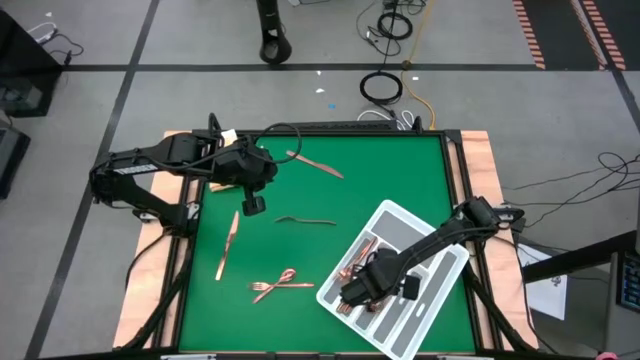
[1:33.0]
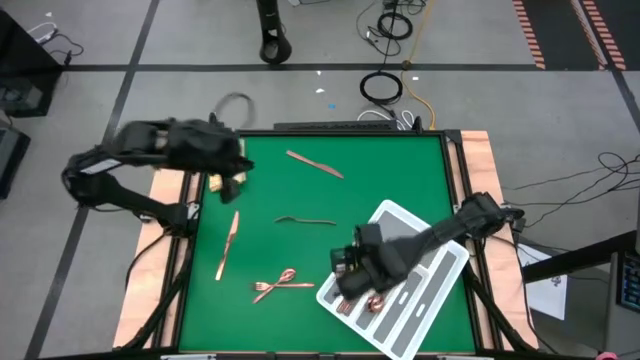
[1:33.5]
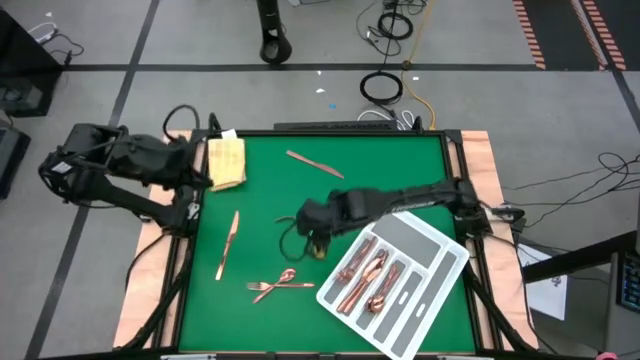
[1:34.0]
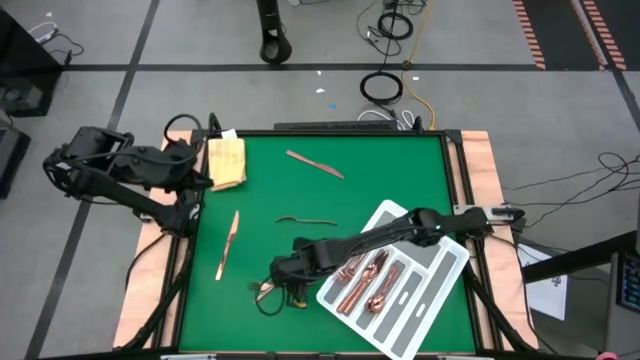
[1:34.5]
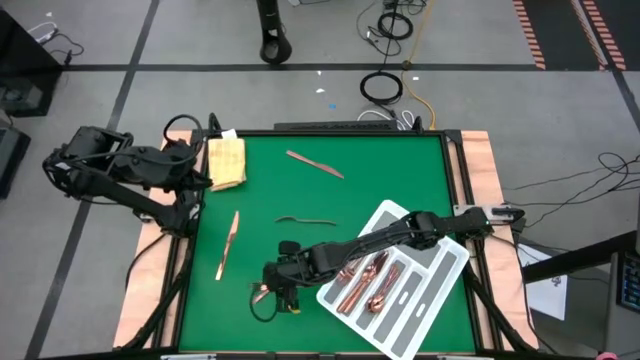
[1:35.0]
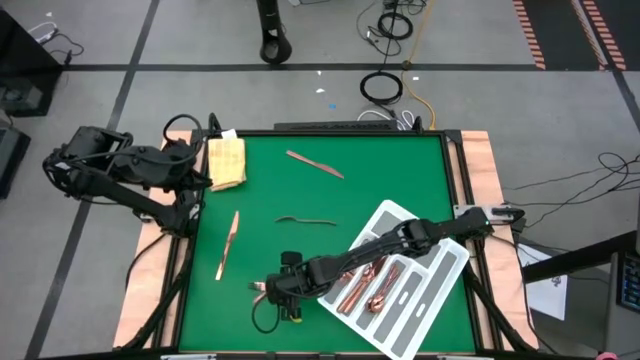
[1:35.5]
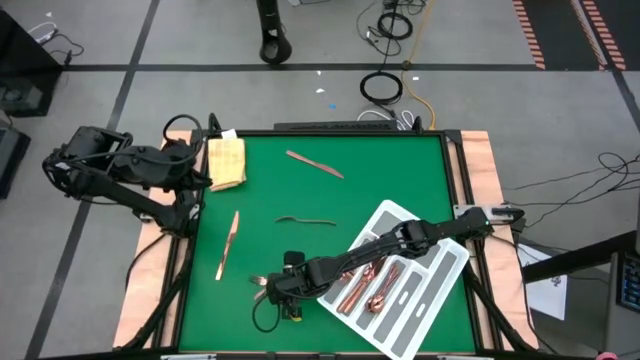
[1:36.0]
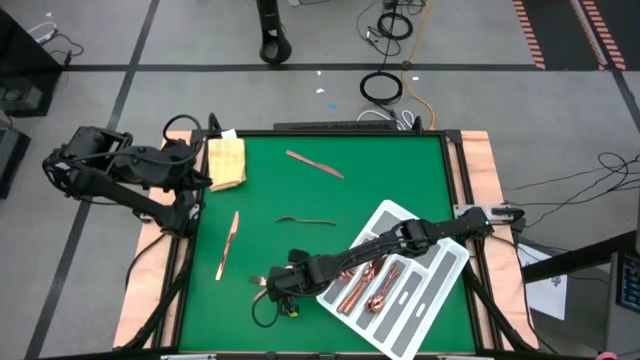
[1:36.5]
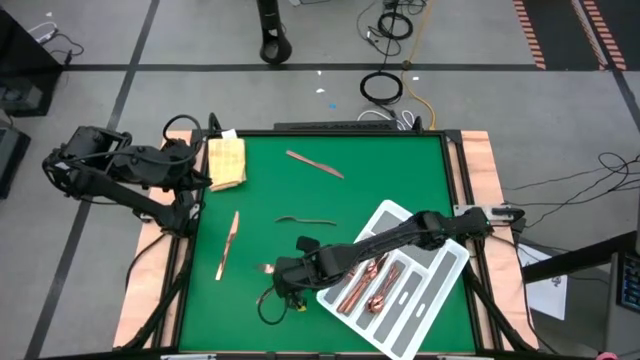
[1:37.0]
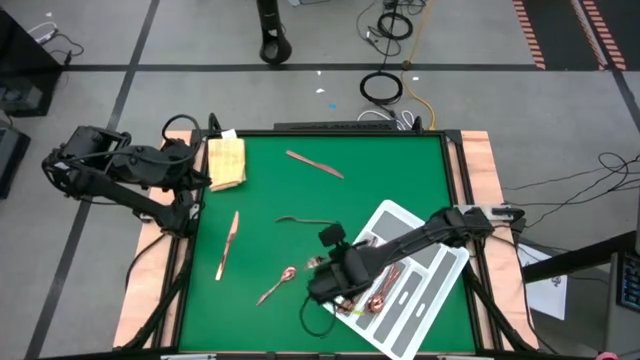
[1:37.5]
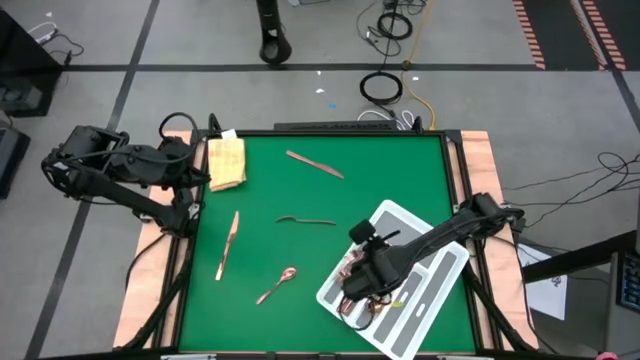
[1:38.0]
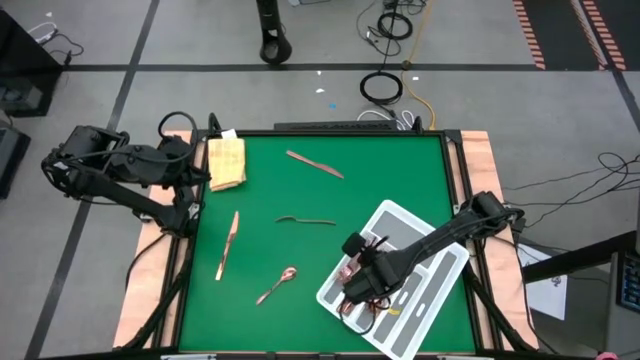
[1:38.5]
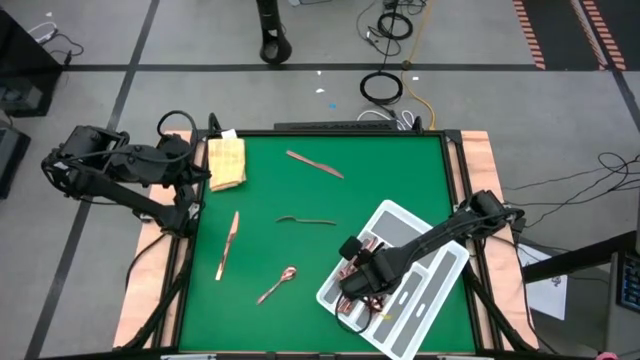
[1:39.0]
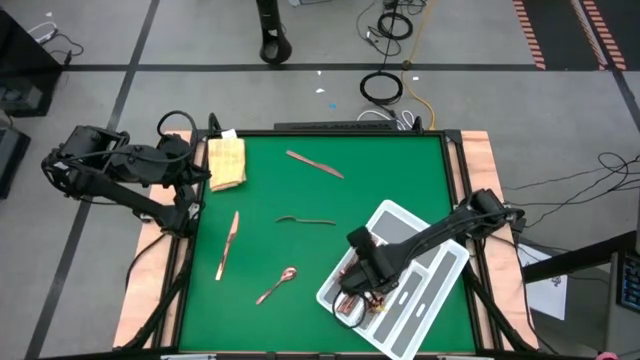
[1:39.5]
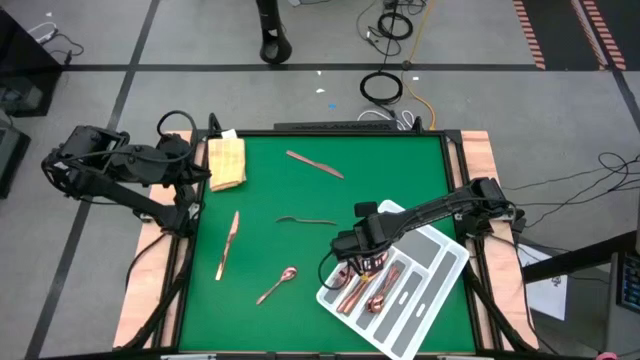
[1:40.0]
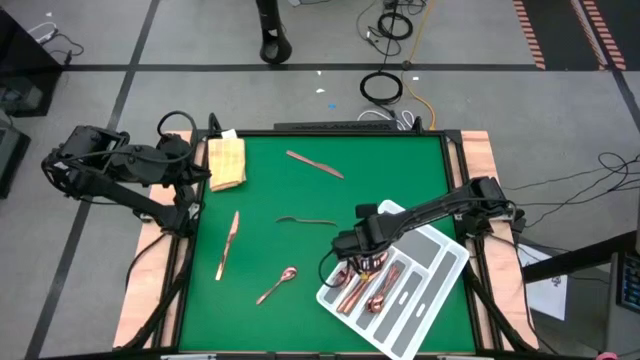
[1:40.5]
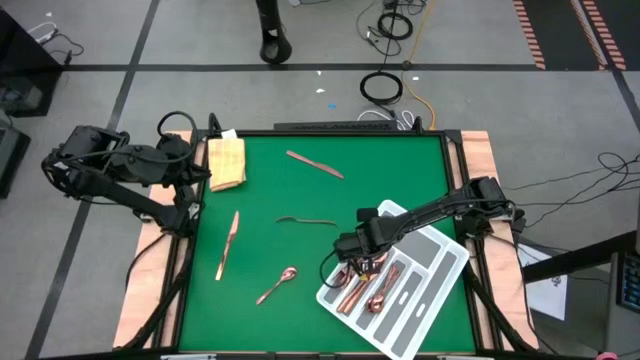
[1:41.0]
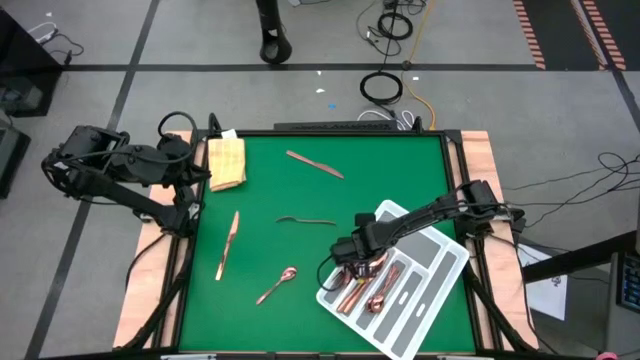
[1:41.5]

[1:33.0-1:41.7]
Task: Sort silverware
Put the bronze fork into the silverware tray

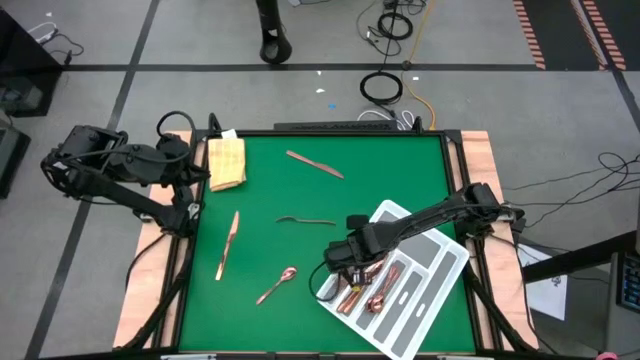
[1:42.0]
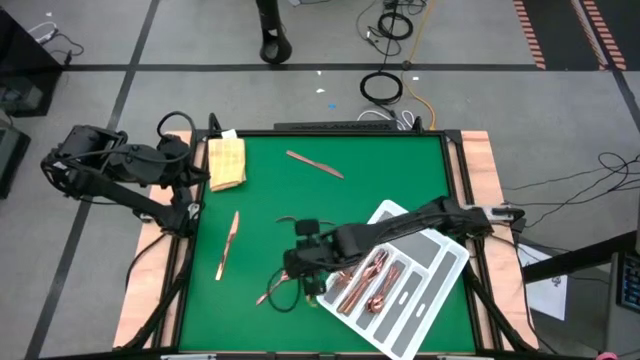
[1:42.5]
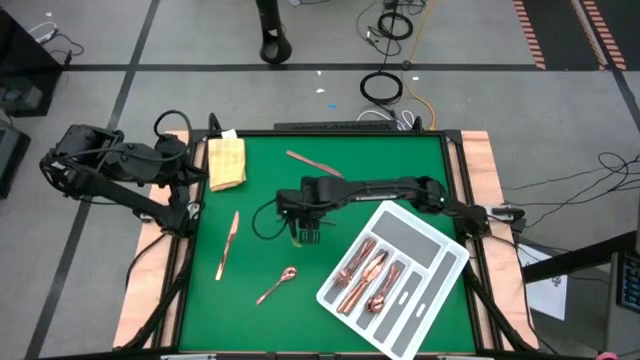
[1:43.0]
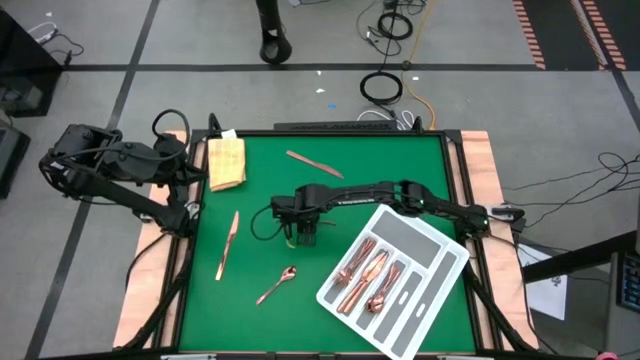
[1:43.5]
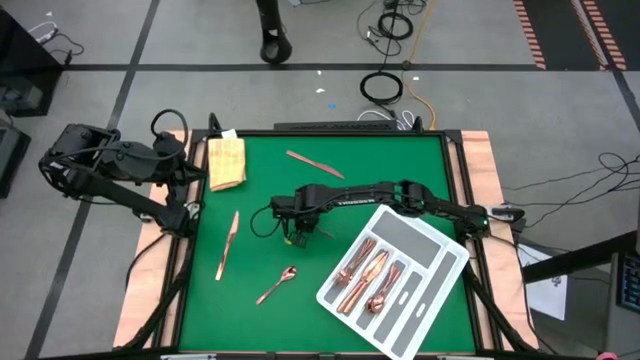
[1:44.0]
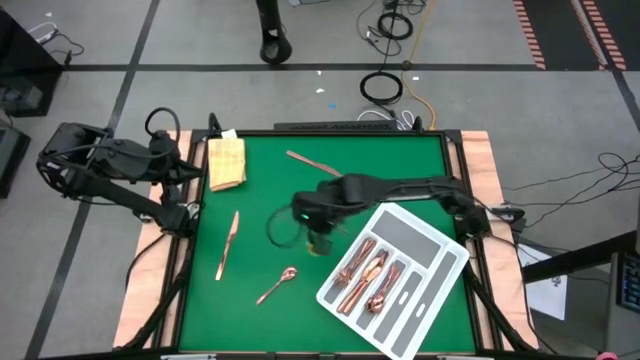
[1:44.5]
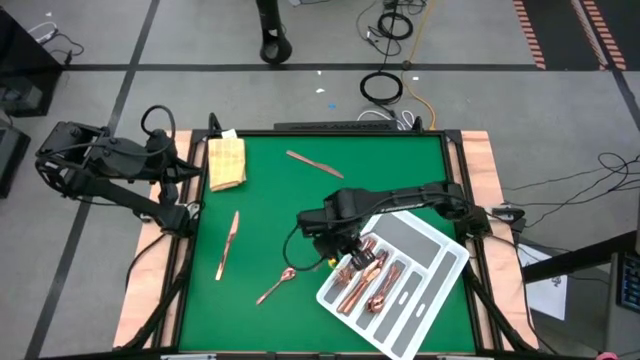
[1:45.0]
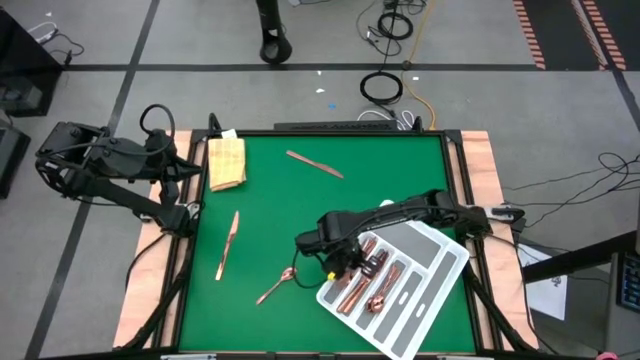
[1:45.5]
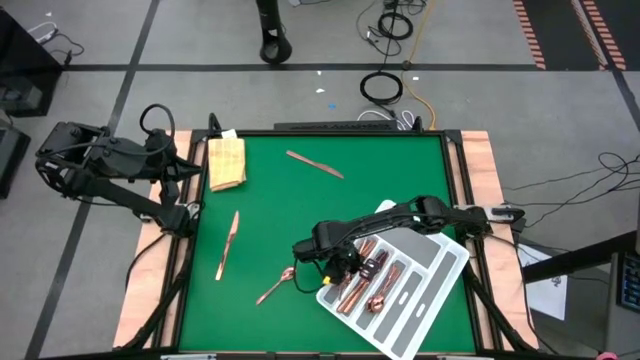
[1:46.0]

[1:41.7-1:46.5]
Put the bronze fork into the silverware tray

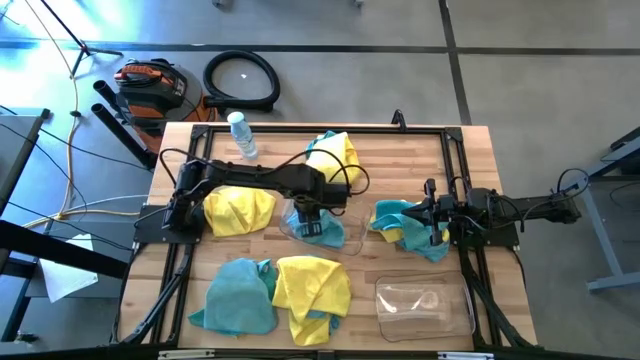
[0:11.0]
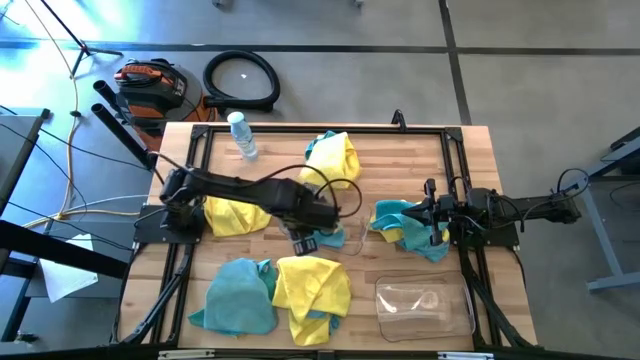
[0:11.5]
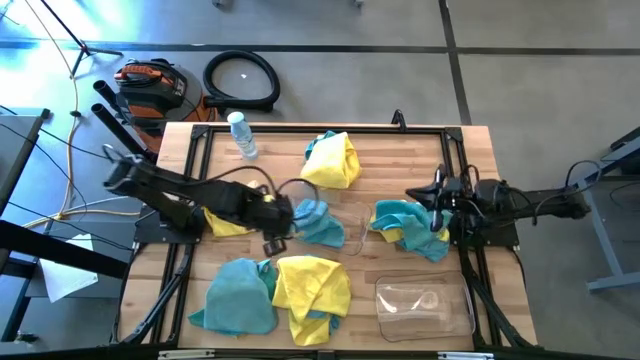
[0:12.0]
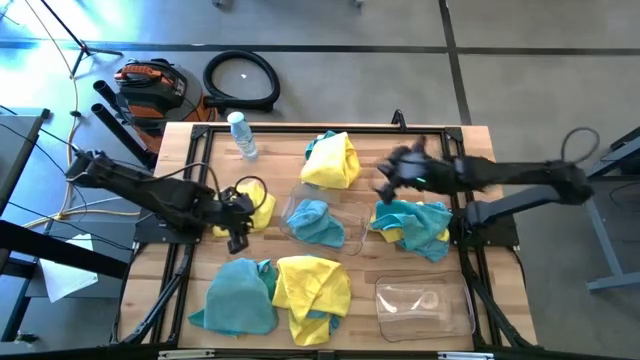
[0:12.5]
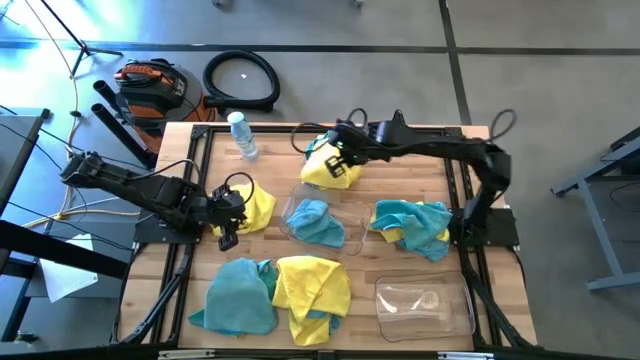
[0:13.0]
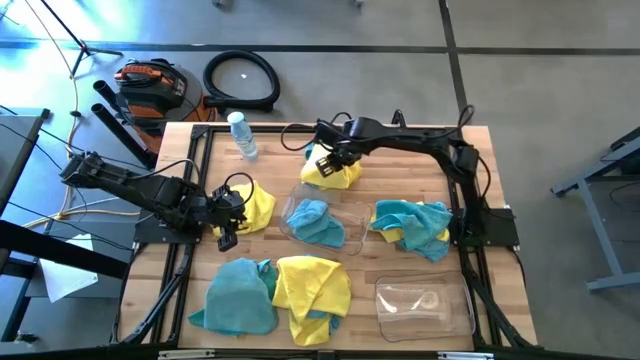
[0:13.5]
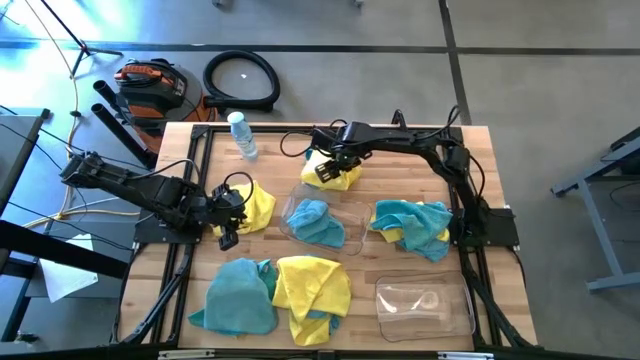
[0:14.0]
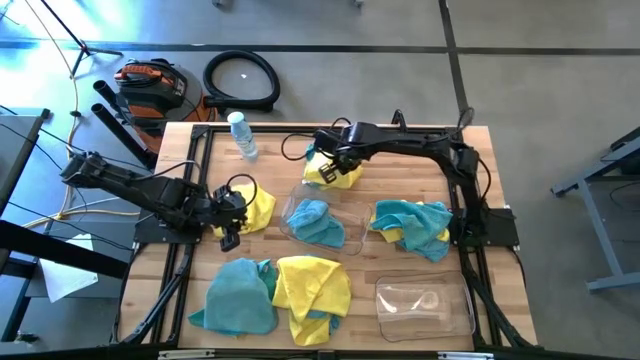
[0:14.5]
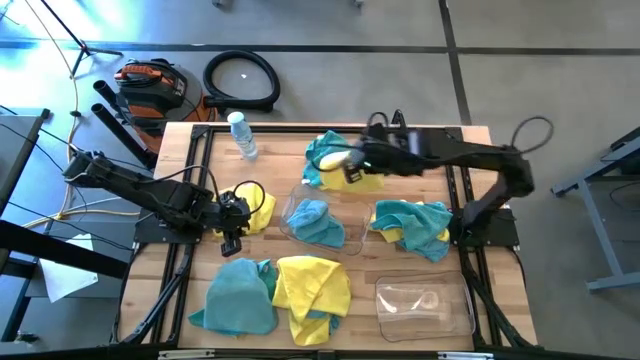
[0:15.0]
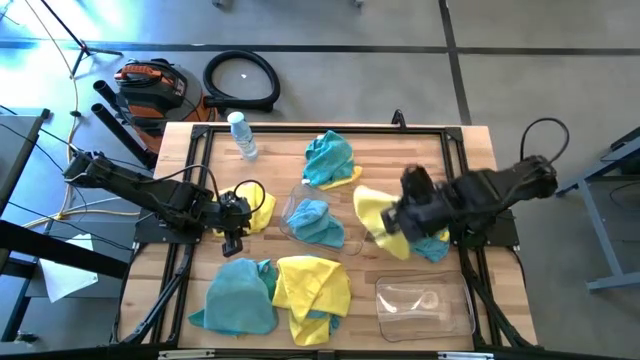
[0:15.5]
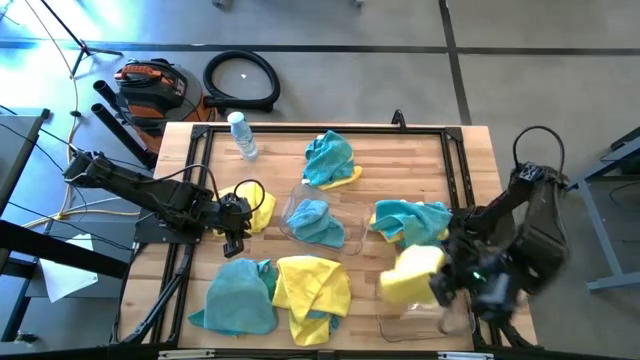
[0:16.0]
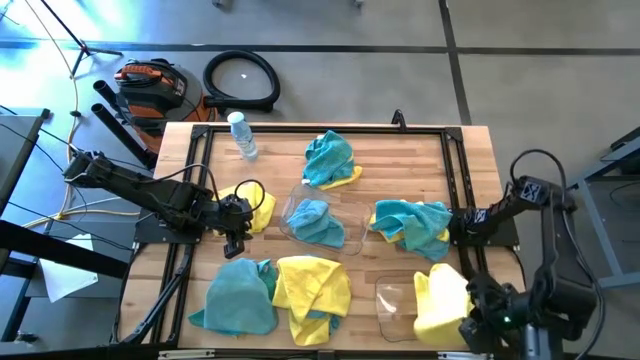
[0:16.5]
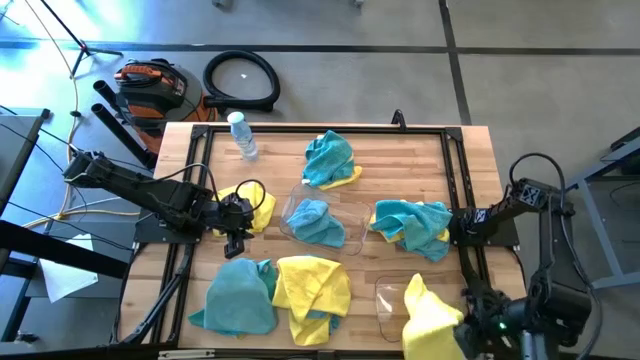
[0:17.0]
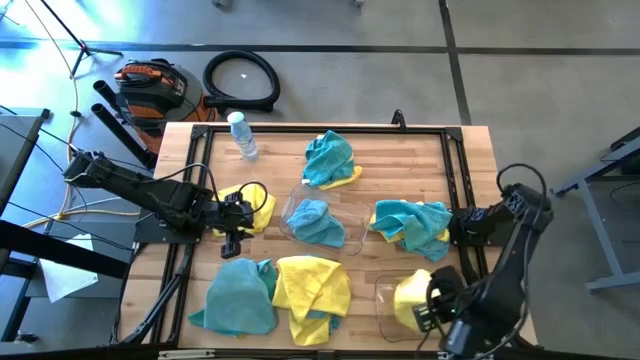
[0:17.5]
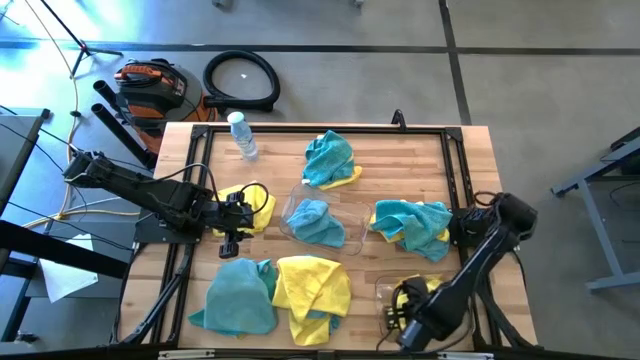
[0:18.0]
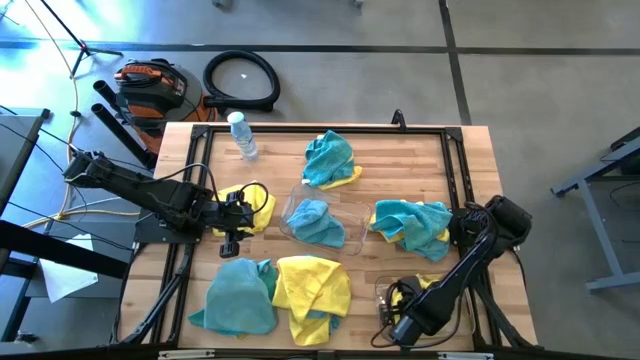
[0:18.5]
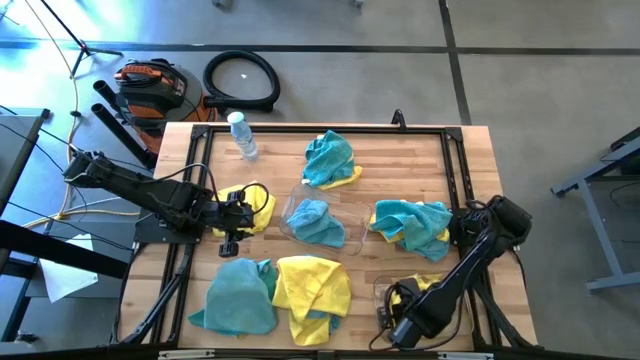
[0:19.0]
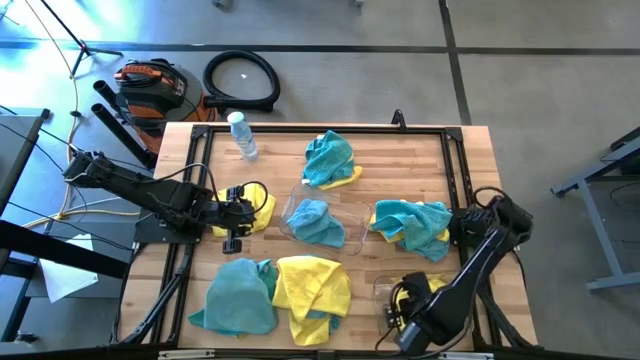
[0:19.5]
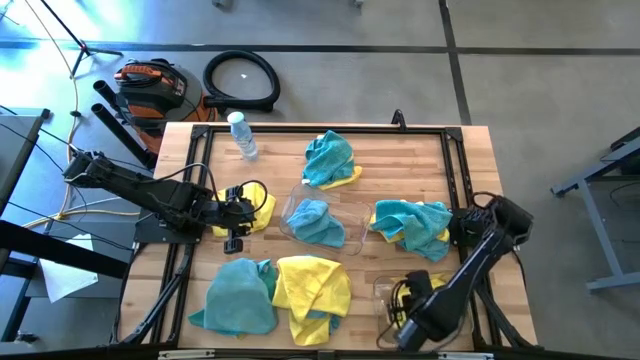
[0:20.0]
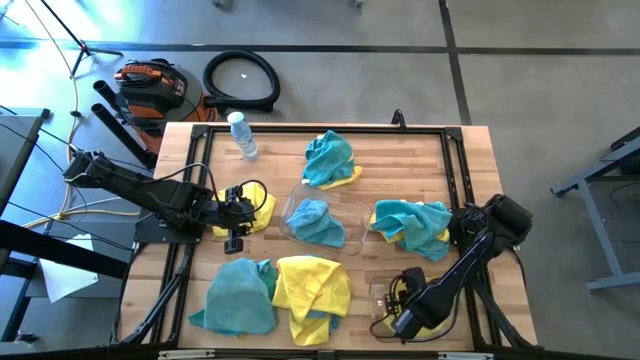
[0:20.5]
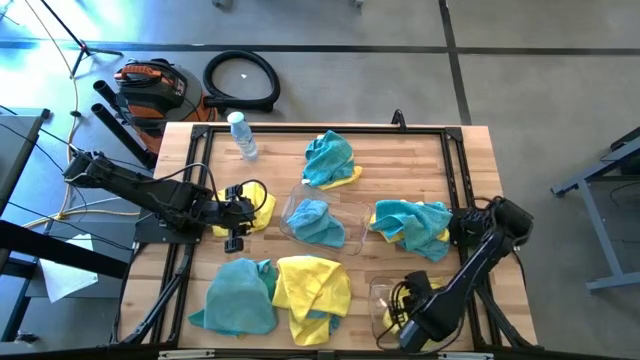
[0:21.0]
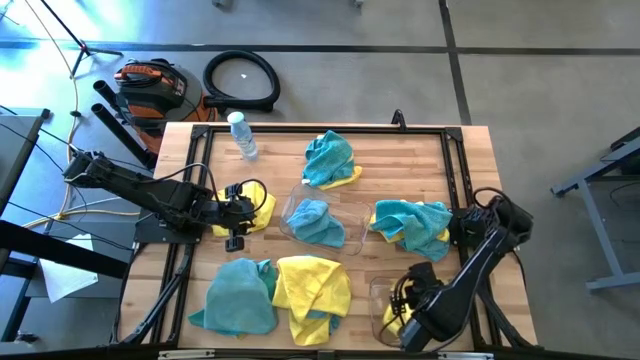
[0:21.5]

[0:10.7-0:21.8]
Task: Sort microfiber towel by color & place in baskets
Put the yellow towel in the bottom transparent bin
